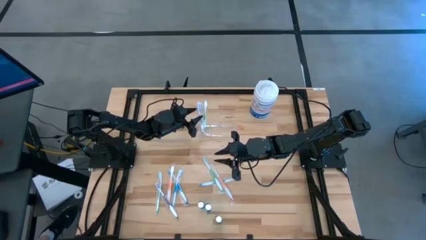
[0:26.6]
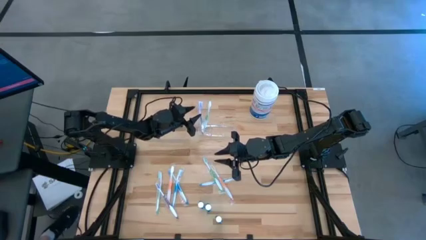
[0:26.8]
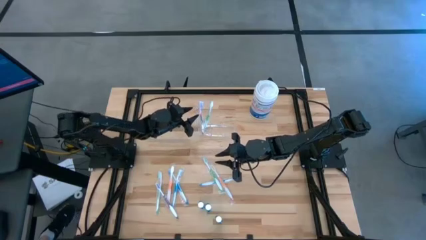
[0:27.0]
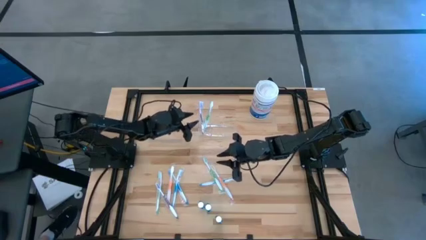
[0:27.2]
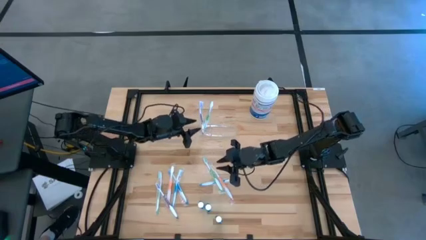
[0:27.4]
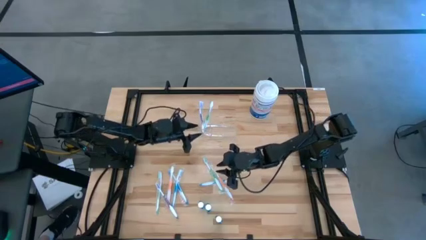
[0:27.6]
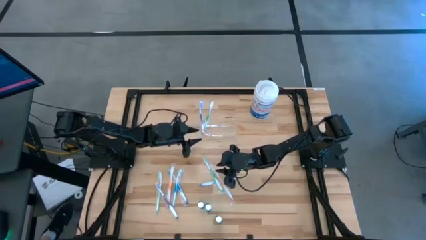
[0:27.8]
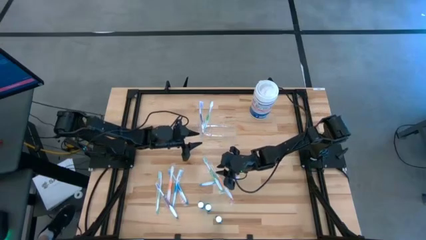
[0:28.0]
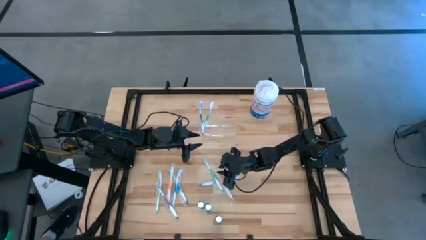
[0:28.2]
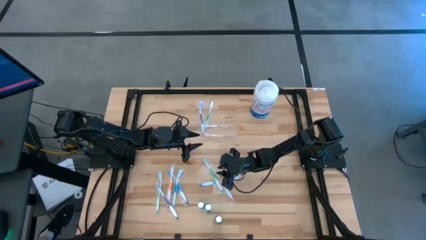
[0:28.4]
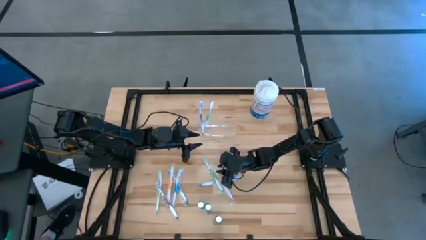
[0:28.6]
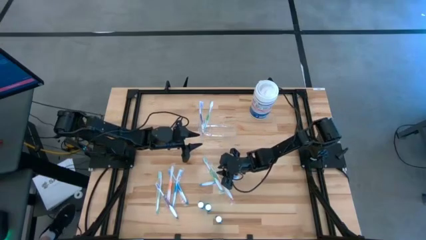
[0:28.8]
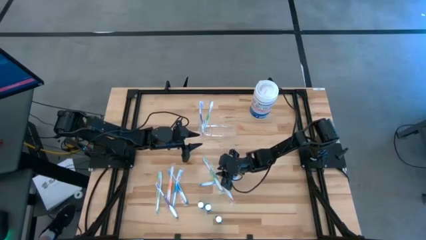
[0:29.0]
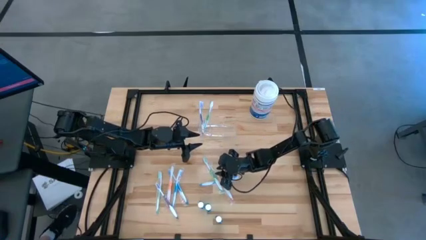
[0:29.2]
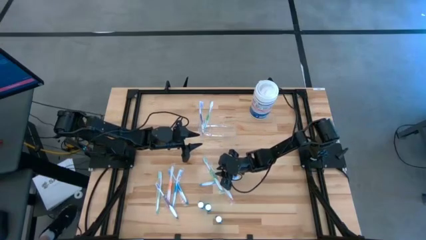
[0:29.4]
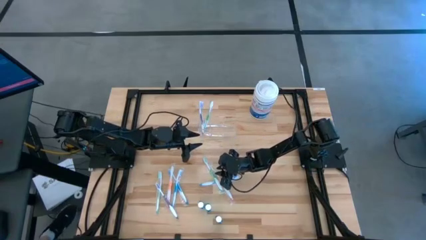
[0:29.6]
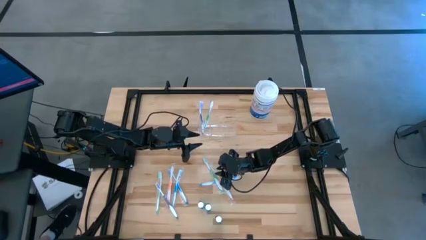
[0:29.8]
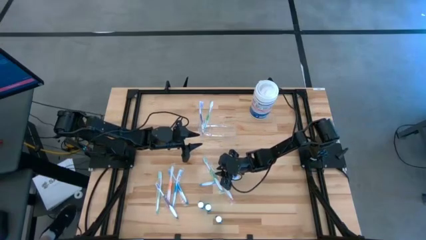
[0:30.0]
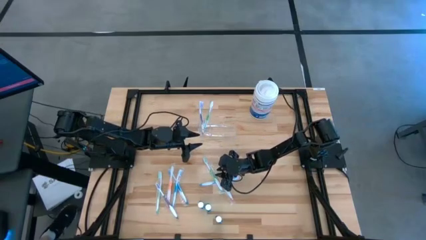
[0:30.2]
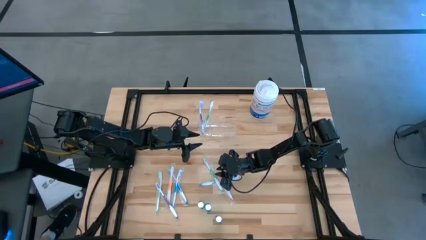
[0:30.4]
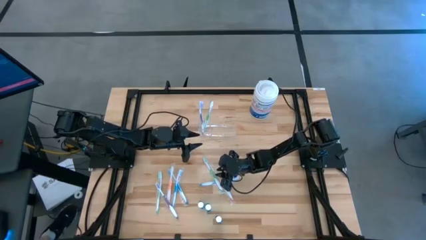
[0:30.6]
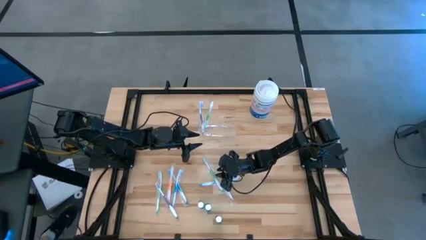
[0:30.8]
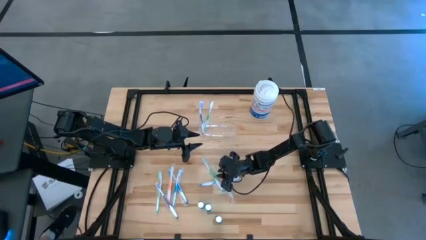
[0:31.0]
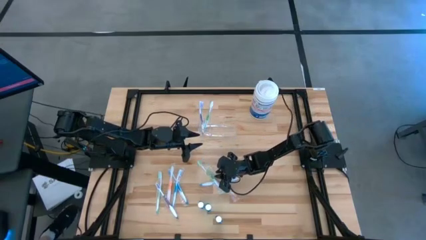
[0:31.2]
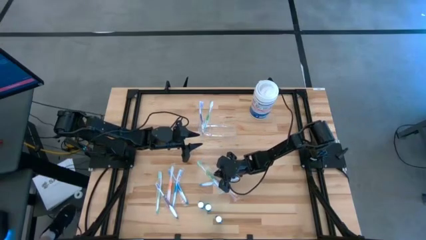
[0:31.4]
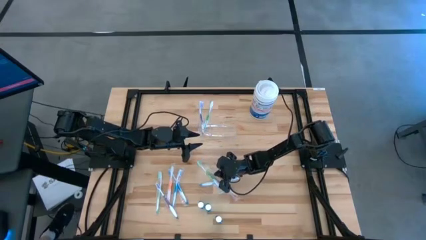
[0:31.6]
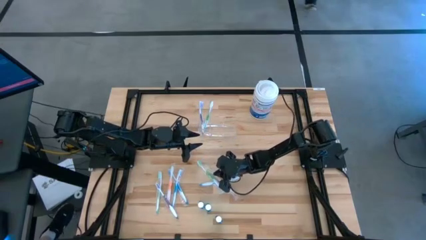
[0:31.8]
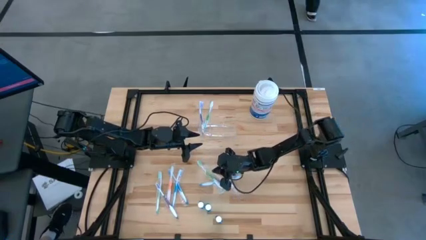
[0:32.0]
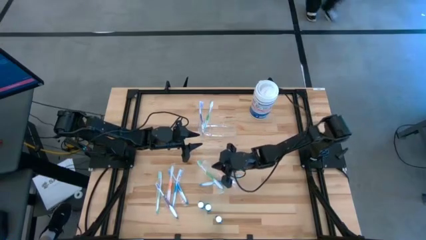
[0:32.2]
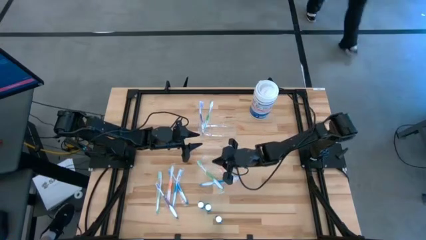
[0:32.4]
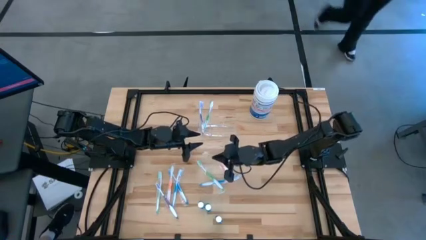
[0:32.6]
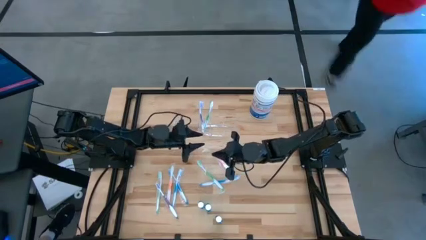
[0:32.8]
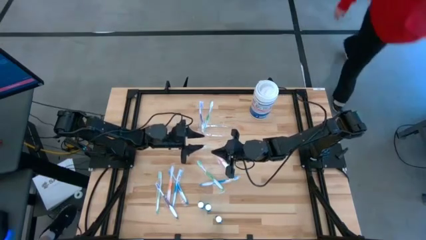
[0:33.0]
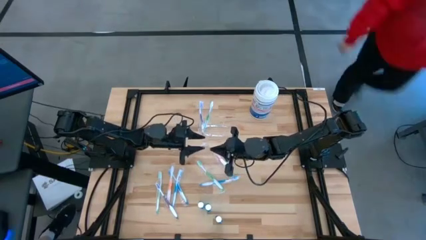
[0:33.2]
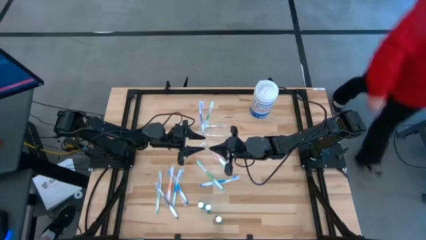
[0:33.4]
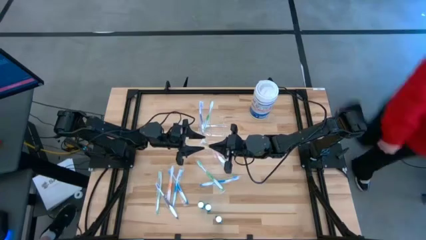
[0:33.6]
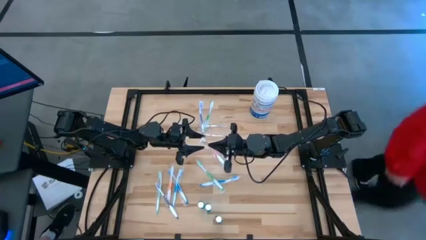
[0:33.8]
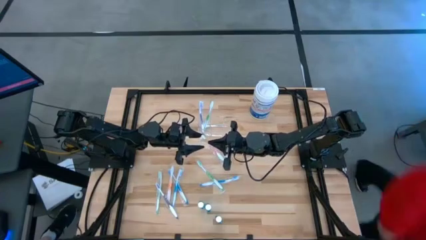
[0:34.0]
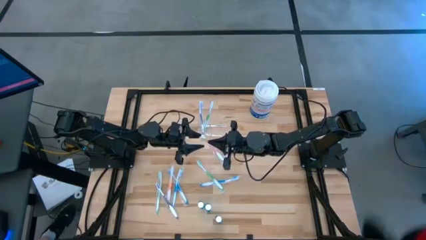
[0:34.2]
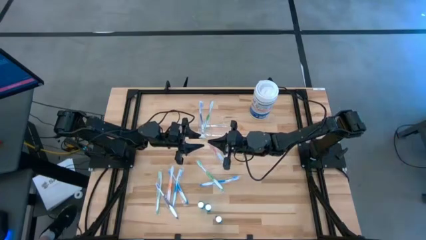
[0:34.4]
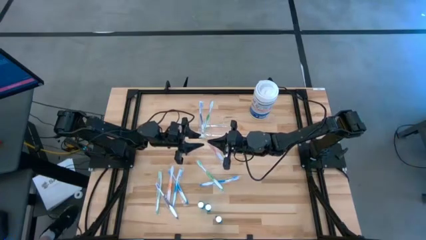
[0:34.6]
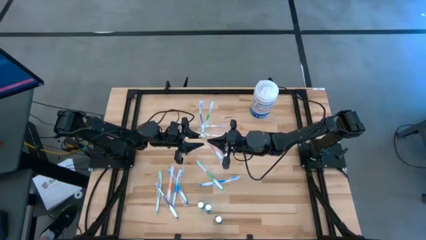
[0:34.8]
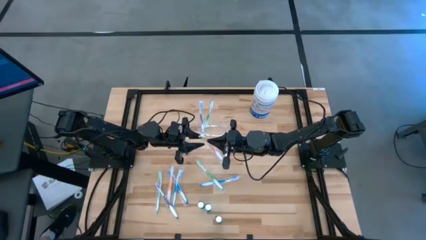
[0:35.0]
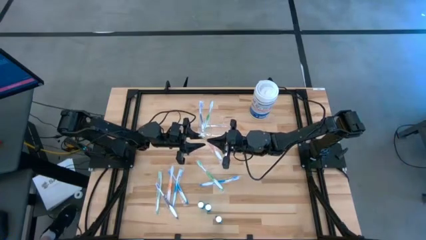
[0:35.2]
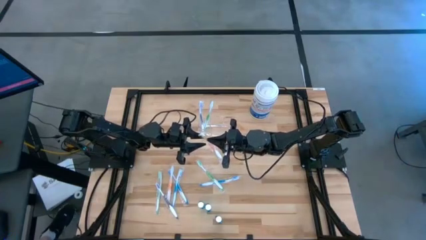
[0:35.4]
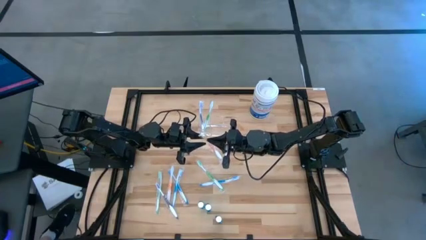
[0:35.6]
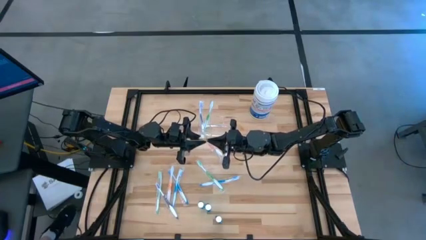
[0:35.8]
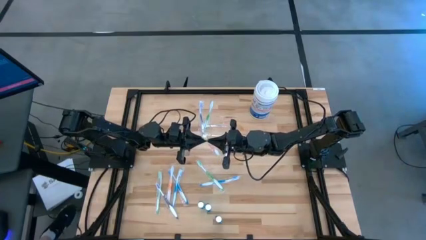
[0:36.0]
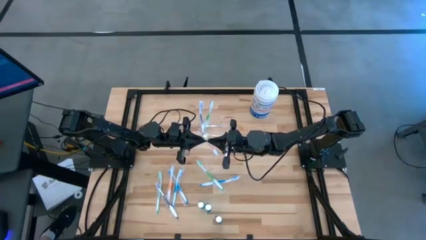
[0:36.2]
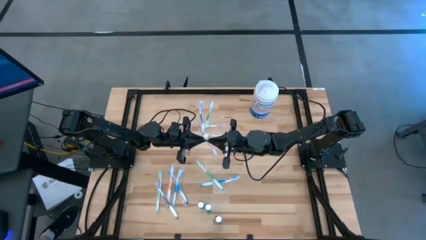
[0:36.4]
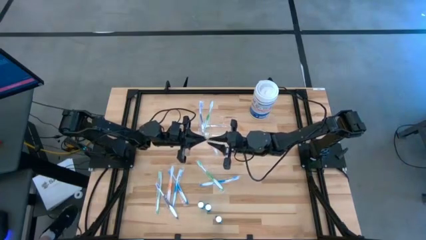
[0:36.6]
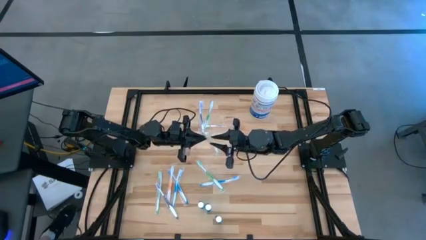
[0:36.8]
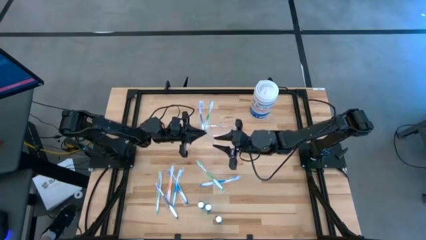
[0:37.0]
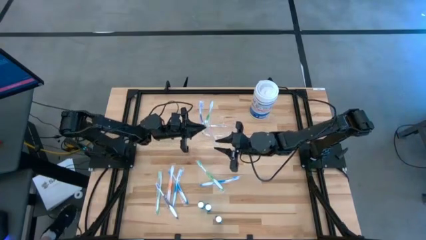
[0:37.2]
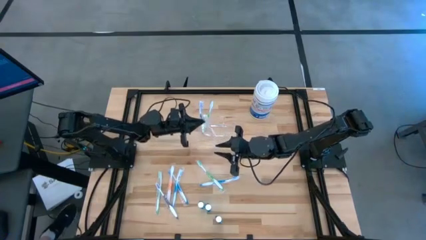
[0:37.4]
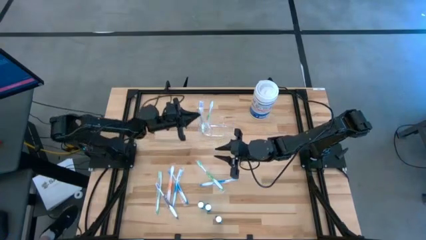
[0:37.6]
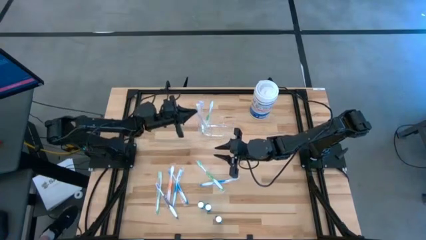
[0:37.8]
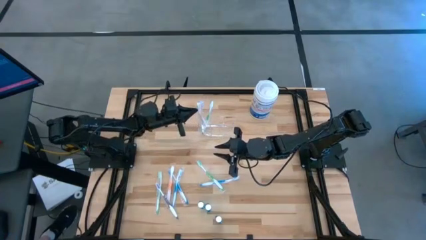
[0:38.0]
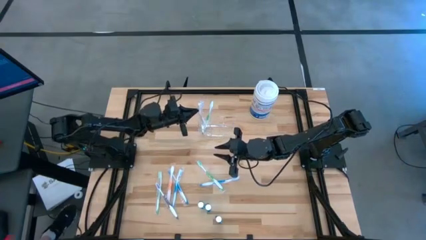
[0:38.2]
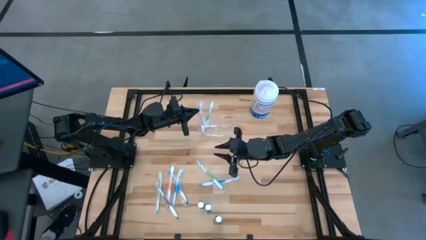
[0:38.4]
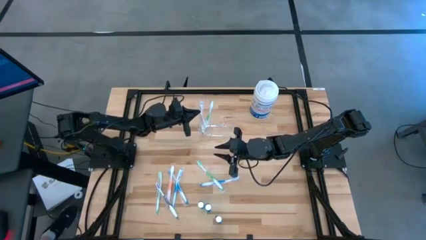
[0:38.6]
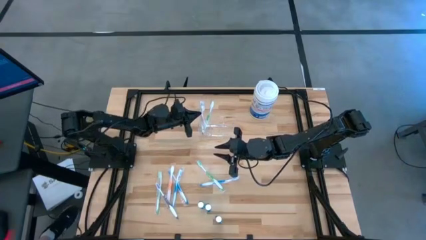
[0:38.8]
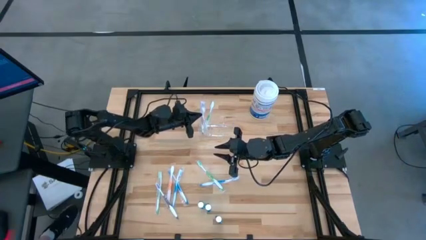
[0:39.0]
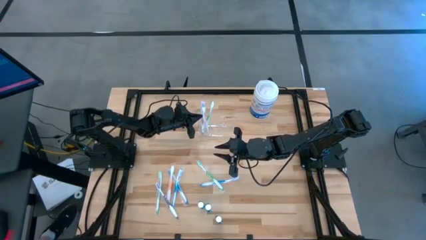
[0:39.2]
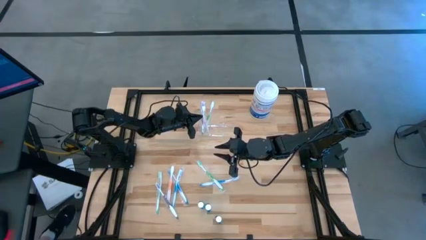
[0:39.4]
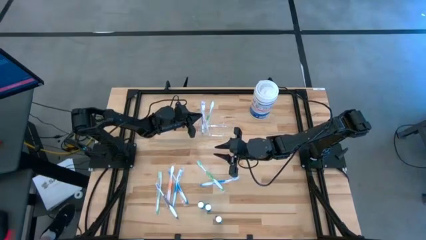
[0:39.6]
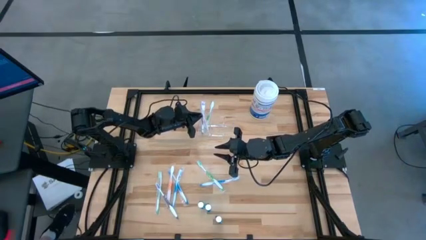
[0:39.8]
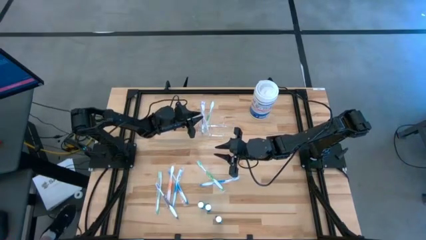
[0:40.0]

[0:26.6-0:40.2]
Task: Pick & Place toothbrushing station
Put the right orange toothbrush into the transparent organizer
